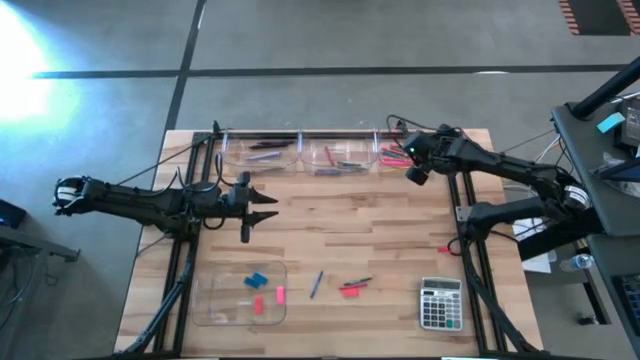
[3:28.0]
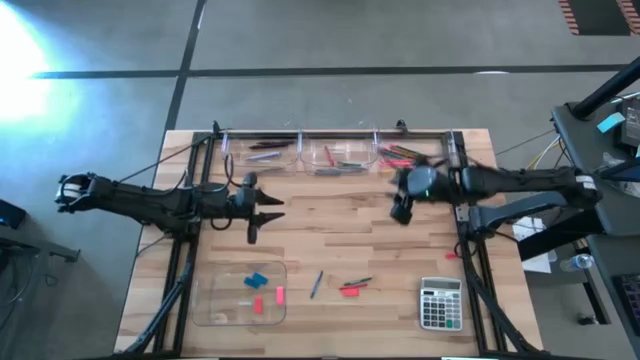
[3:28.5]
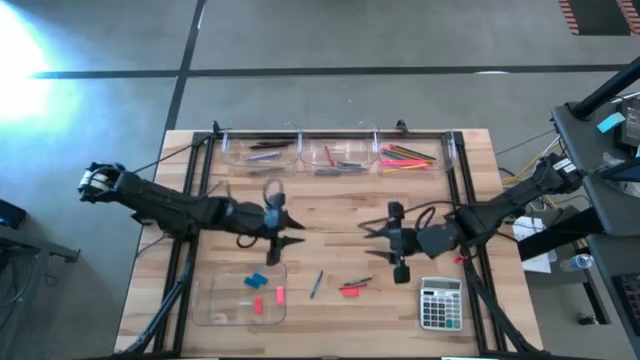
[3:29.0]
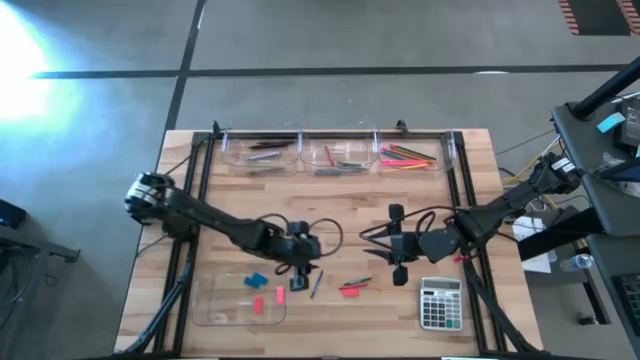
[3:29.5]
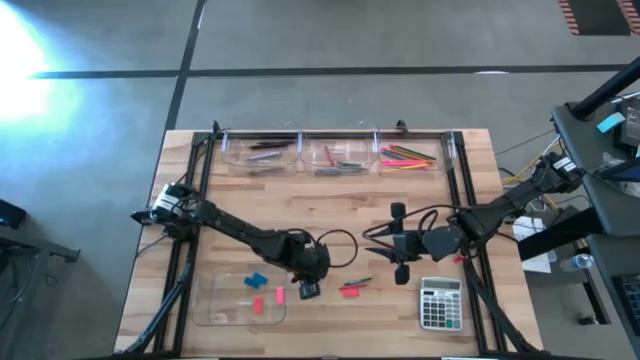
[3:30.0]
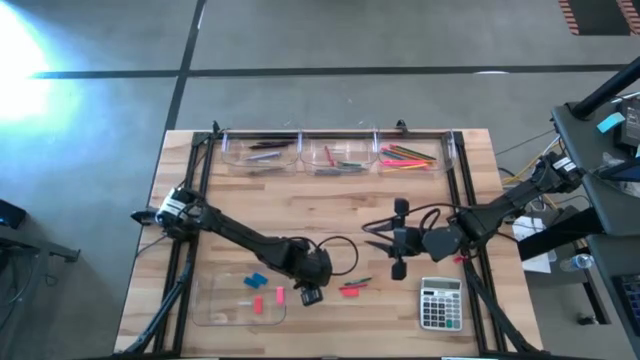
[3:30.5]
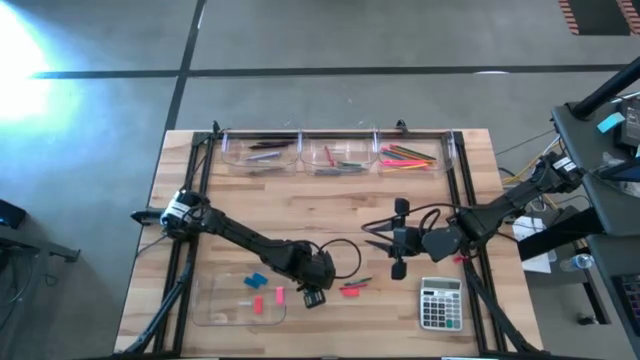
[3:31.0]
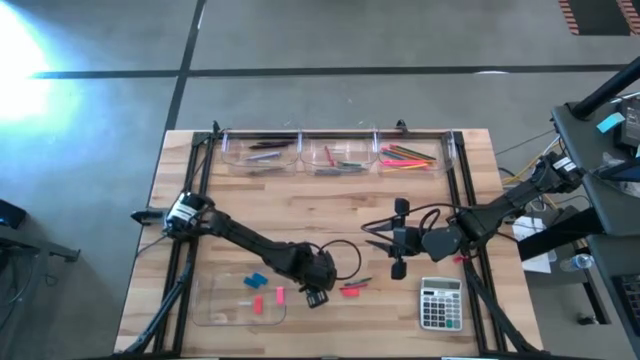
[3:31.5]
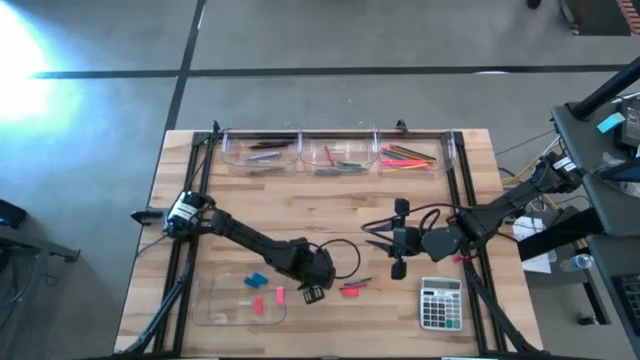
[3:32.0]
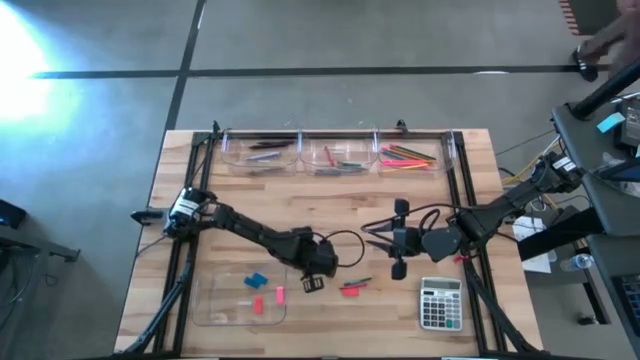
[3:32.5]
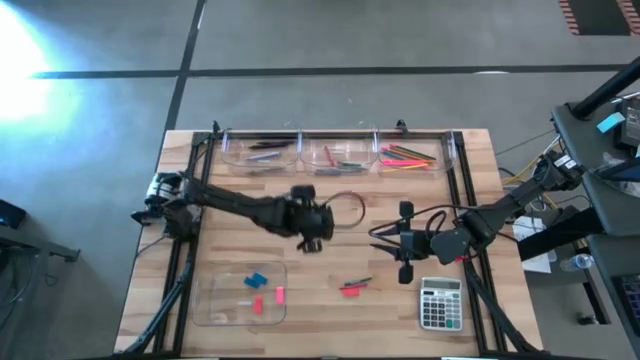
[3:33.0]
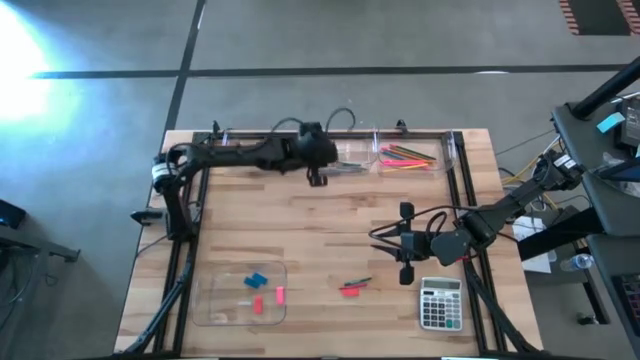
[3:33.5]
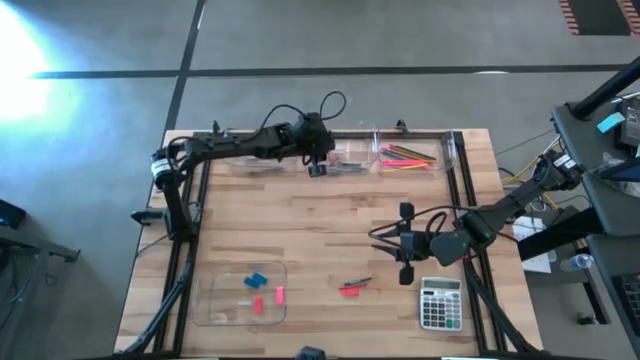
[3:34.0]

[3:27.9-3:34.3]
Task: Sort crayons/erasers/pens/pencils in bins
Put the blue crayon into the top middle transparent bin

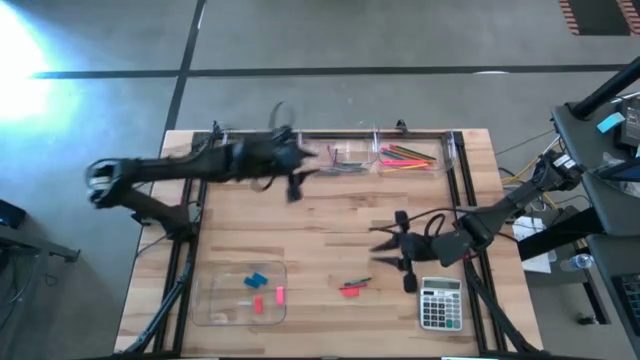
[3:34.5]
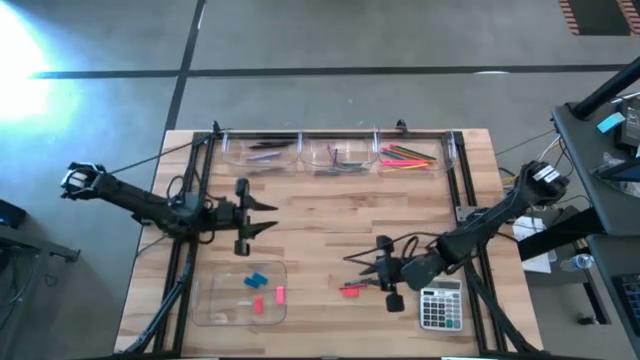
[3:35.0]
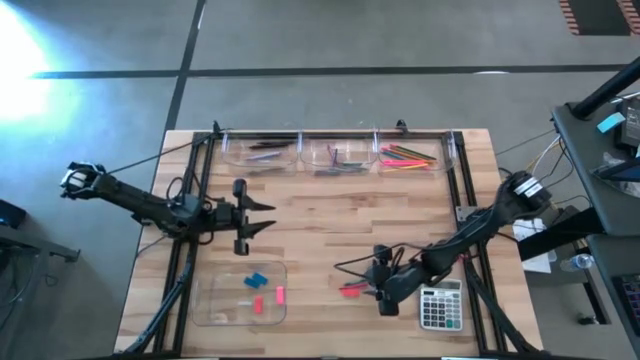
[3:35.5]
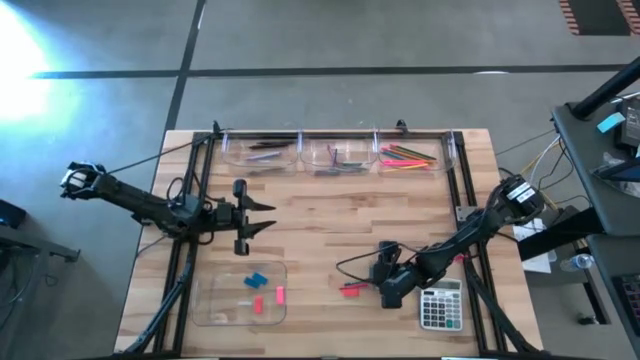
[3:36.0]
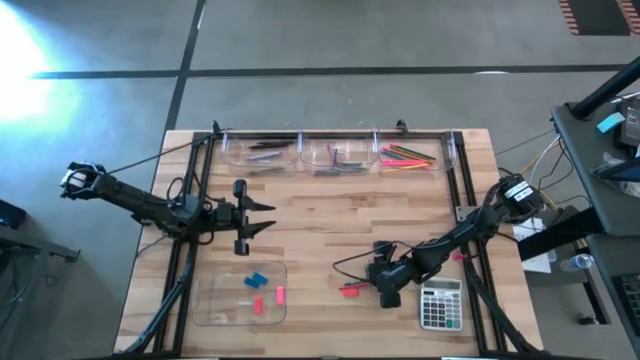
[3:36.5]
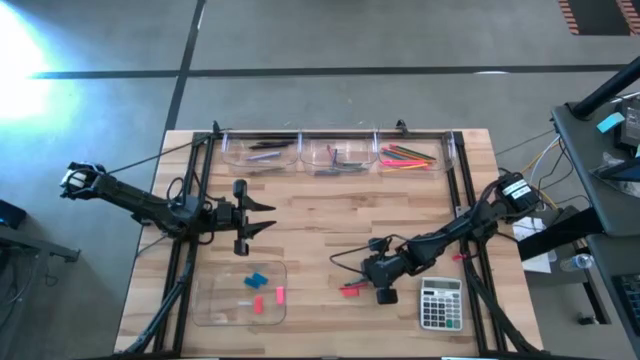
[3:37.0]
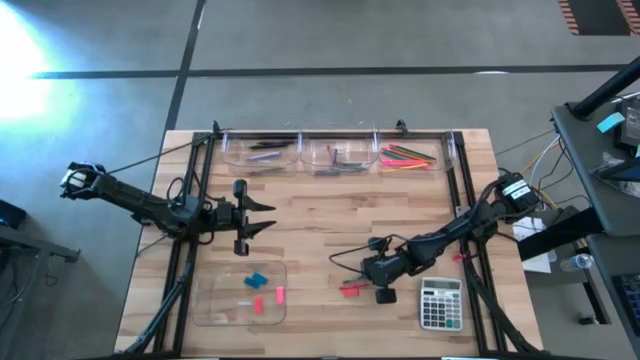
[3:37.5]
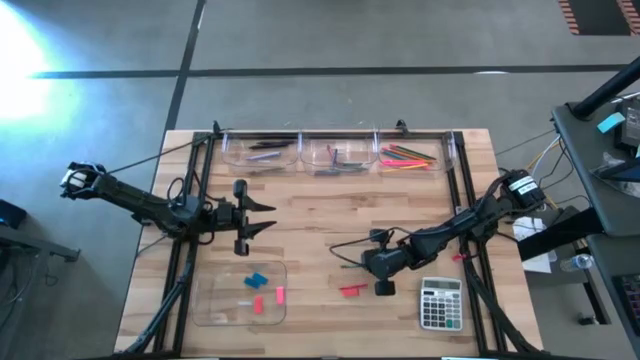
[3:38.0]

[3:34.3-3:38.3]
Put the dark green crayon into the top middle transparent bin

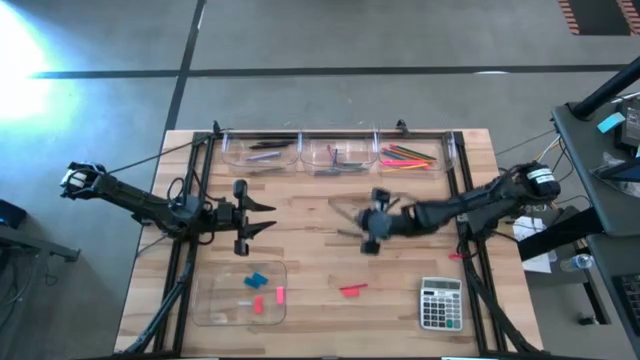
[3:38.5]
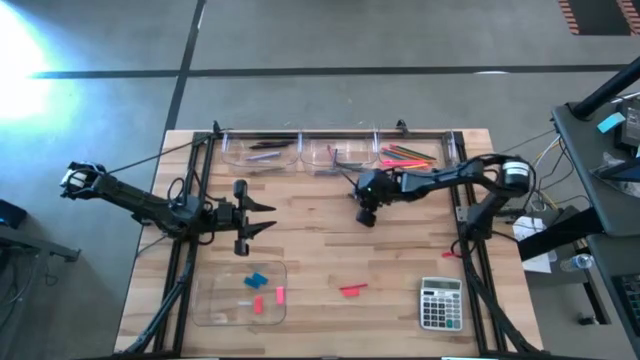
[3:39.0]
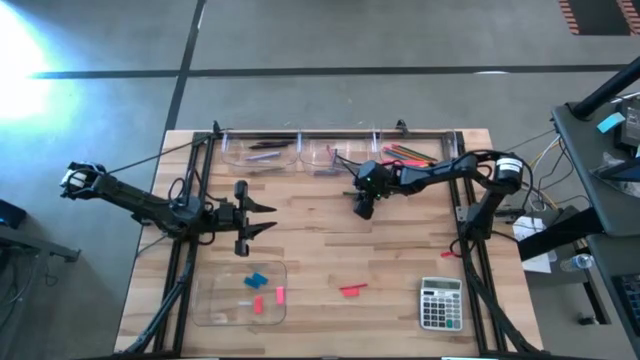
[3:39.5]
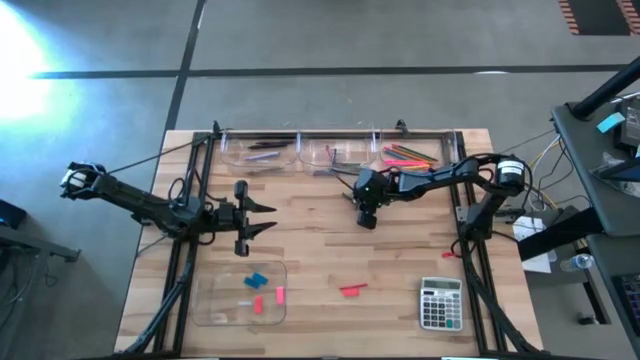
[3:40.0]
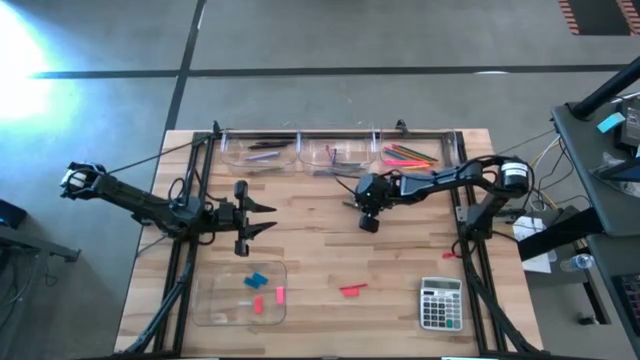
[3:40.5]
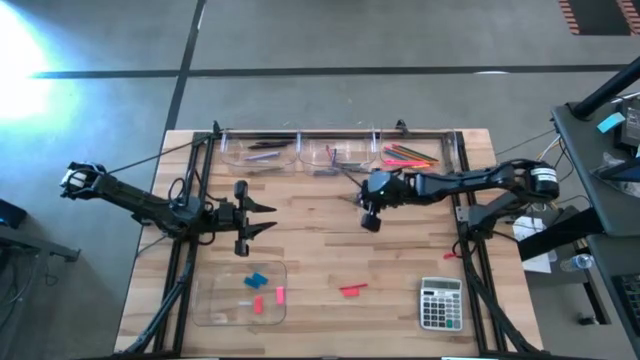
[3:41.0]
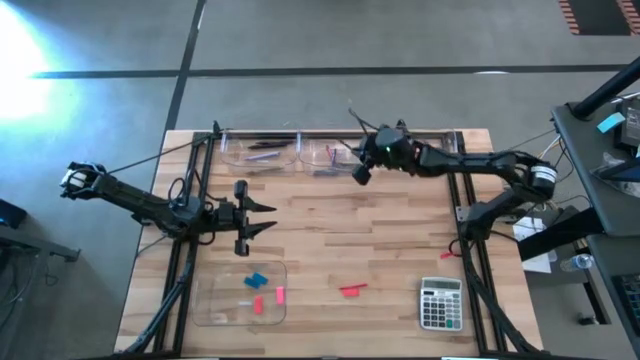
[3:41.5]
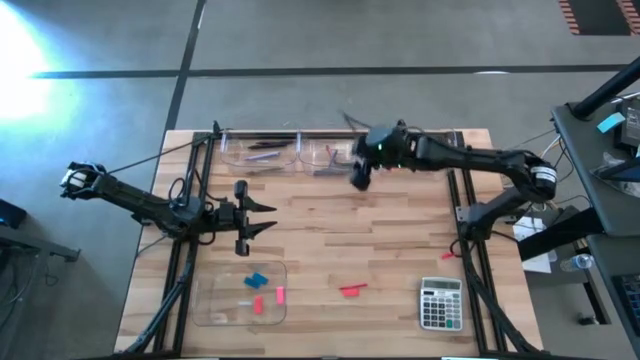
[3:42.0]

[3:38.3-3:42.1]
Put the dark green crayon into the top middle transparent bin

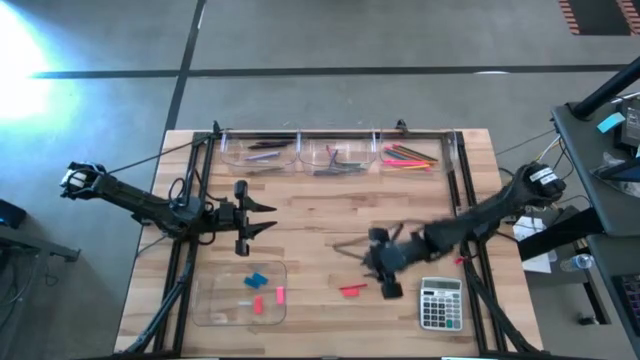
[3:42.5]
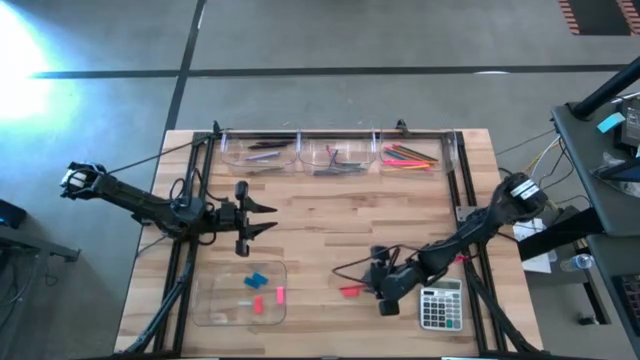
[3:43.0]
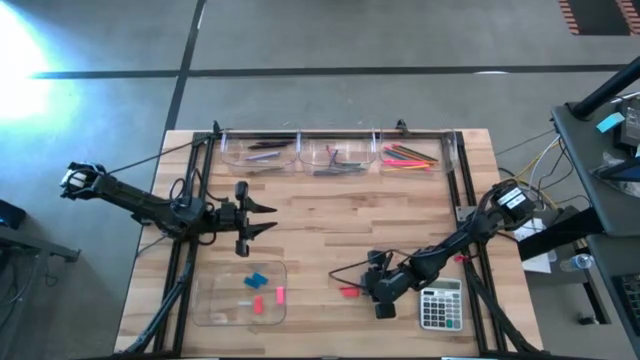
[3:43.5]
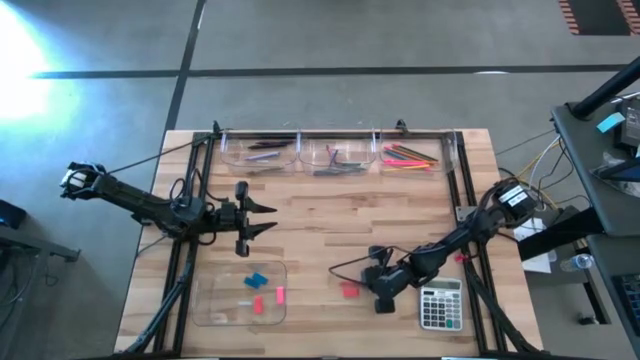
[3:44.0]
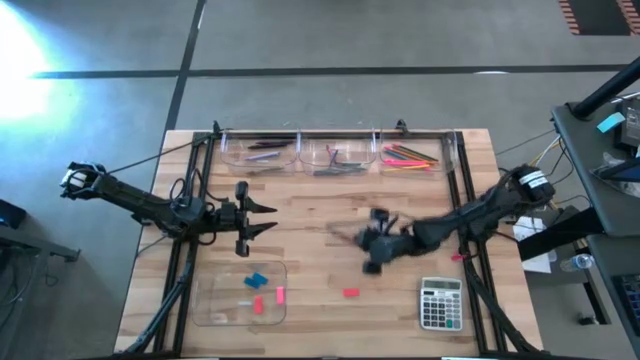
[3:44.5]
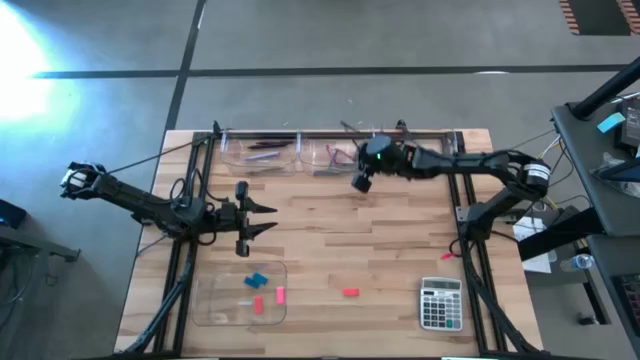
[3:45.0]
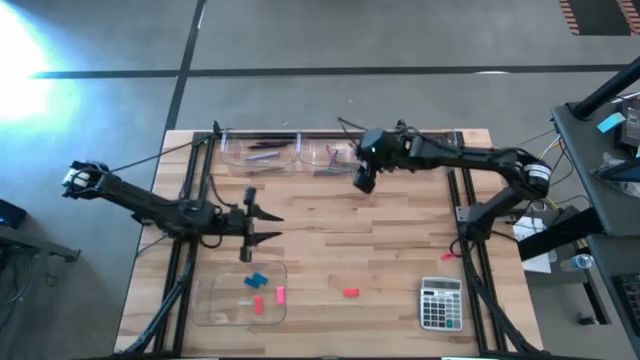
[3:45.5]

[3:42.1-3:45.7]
Put the red crayon into the top middle transparent bin

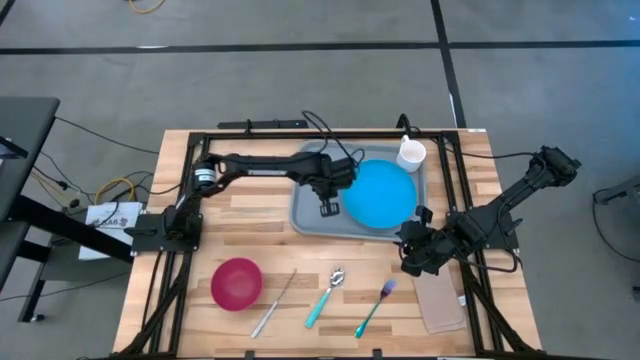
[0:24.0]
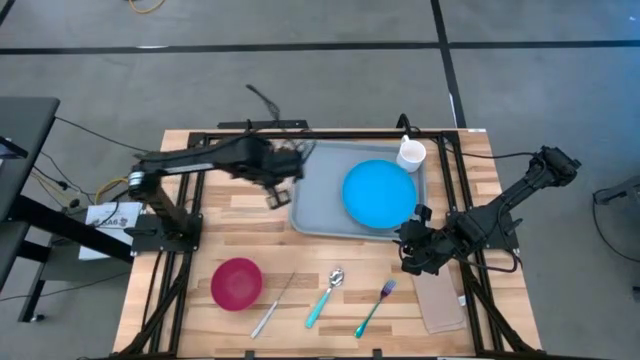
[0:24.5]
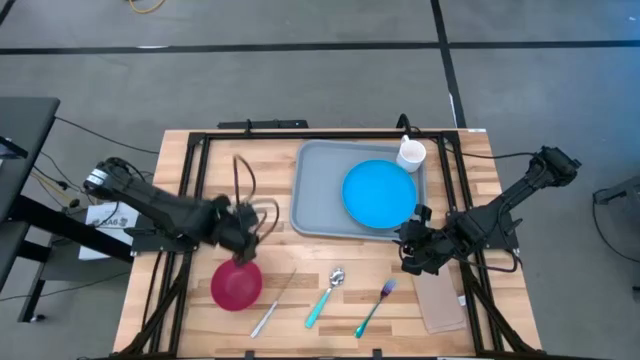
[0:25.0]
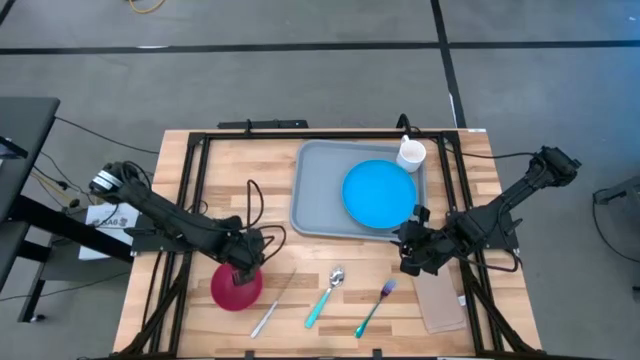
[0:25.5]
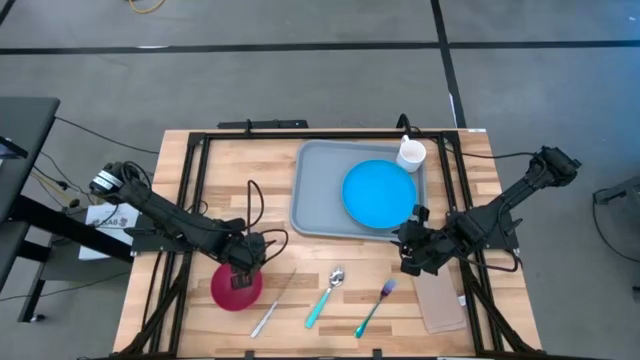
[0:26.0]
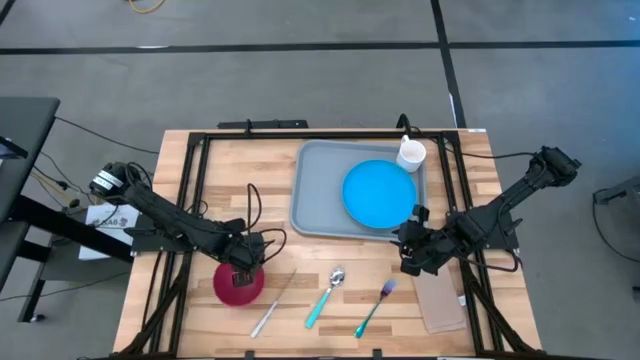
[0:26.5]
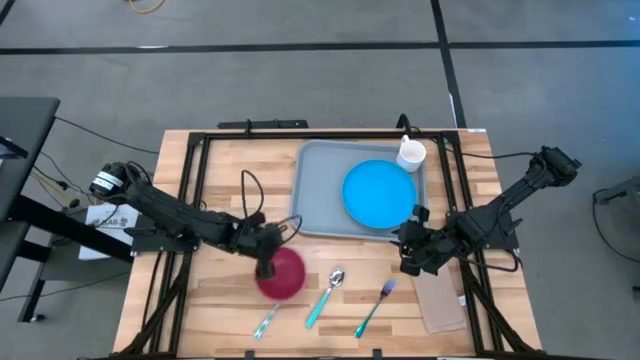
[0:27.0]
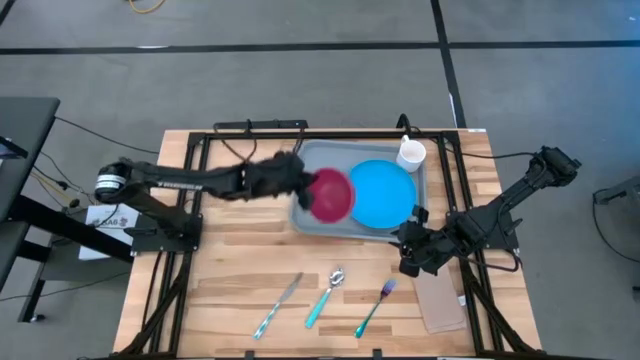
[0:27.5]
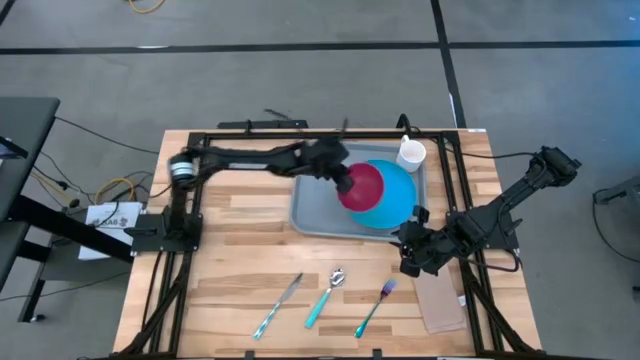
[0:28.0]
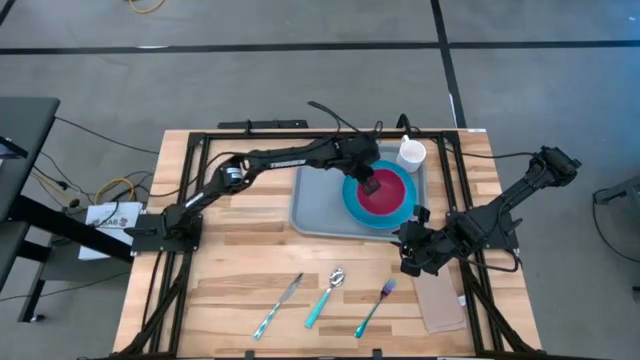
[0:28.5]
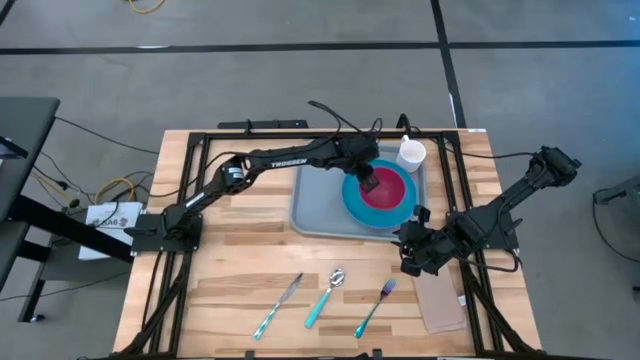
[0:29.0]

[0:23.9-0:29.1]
Task: Set up tray
Put the red bowl on the blue plate on the gray serving tray
